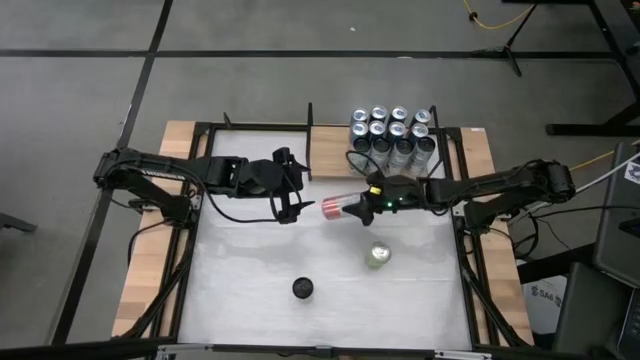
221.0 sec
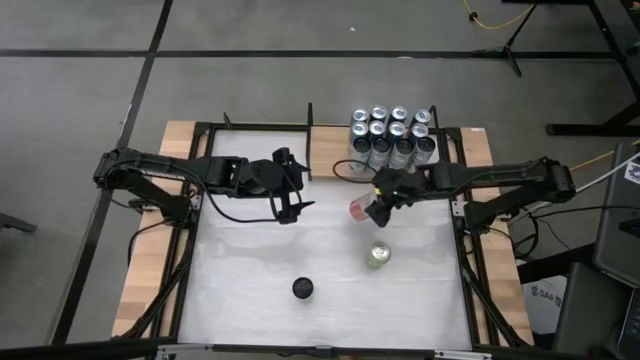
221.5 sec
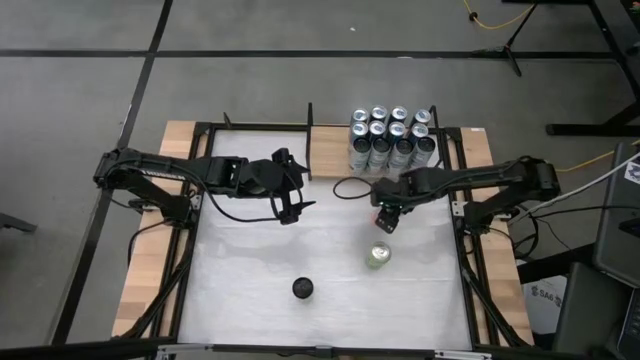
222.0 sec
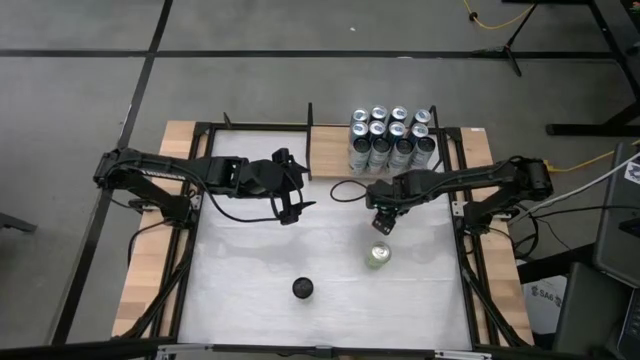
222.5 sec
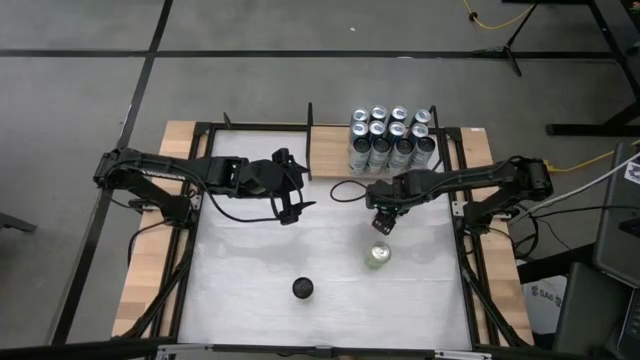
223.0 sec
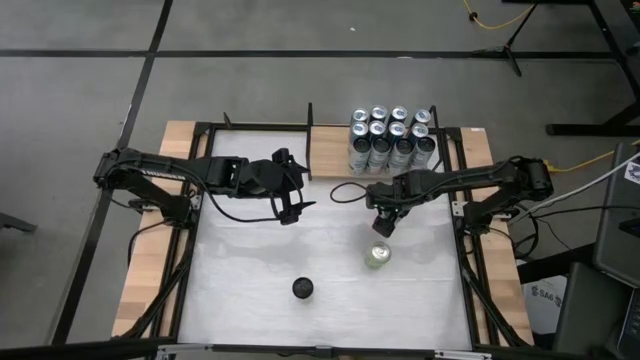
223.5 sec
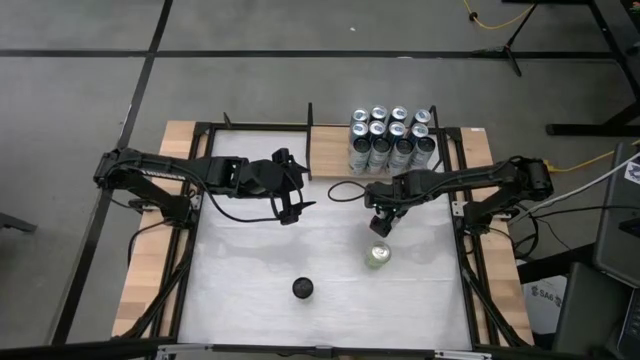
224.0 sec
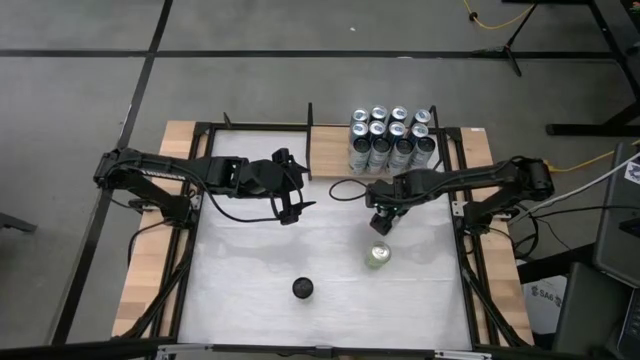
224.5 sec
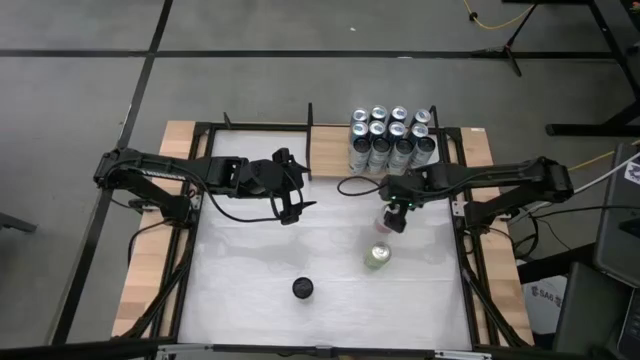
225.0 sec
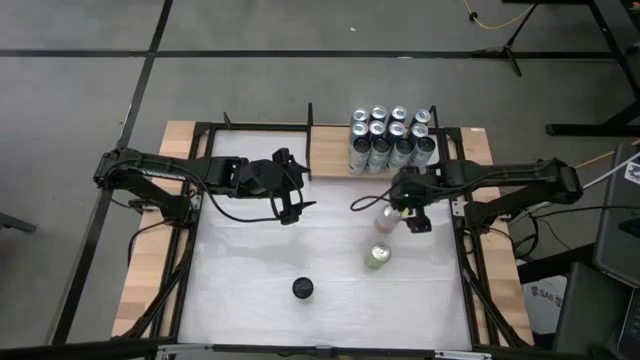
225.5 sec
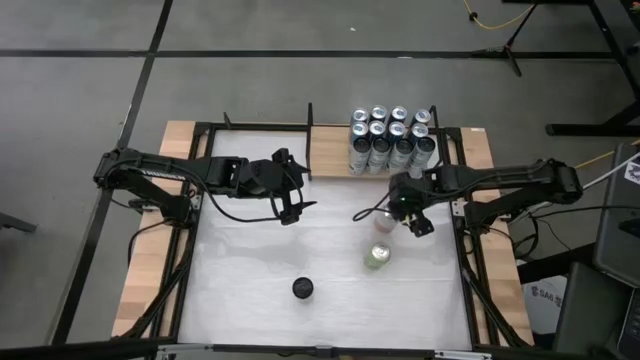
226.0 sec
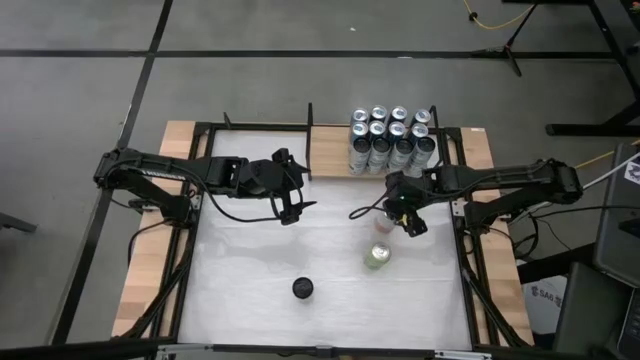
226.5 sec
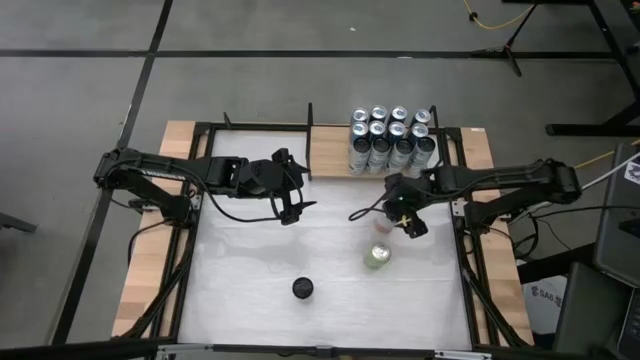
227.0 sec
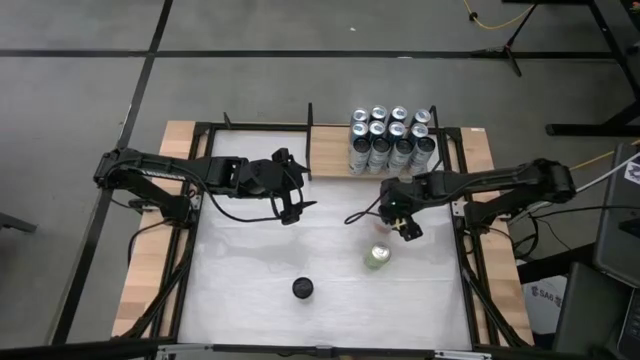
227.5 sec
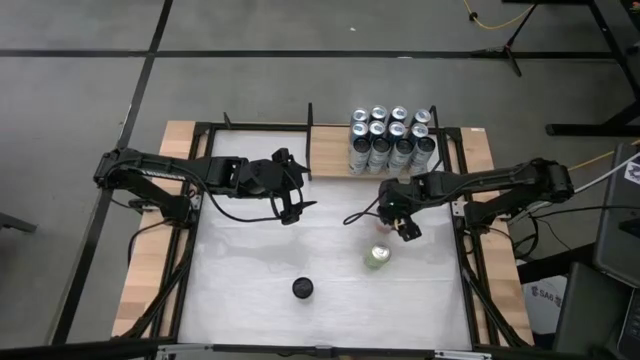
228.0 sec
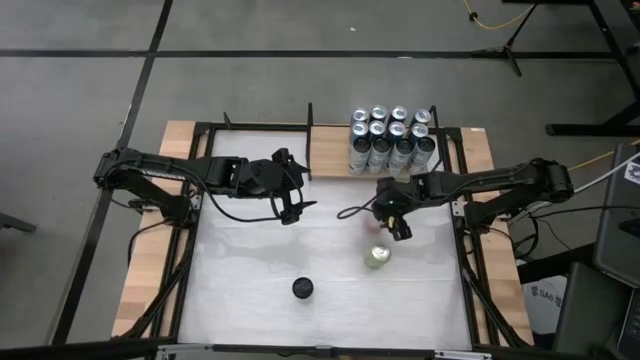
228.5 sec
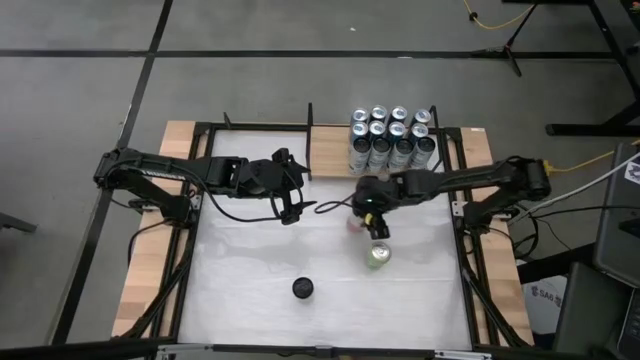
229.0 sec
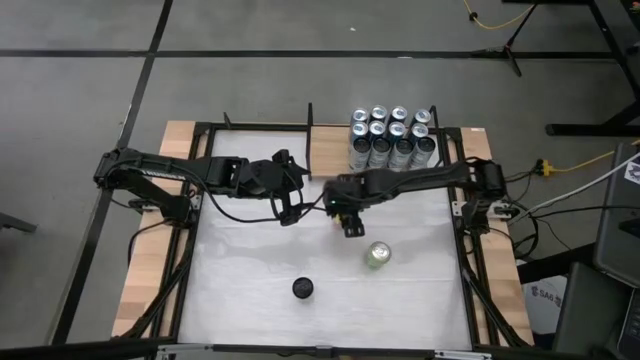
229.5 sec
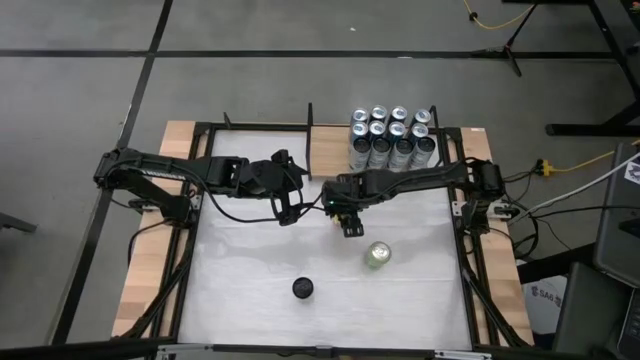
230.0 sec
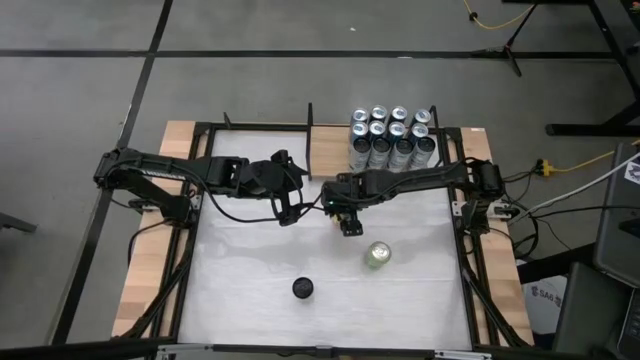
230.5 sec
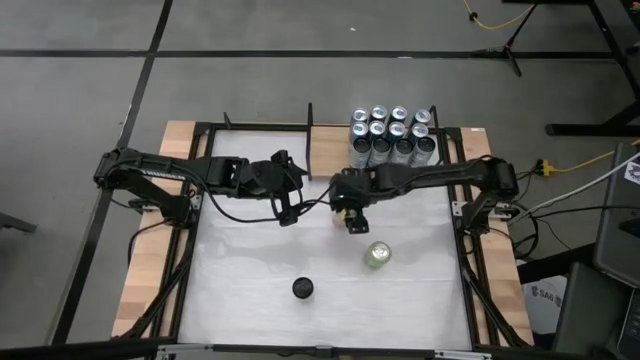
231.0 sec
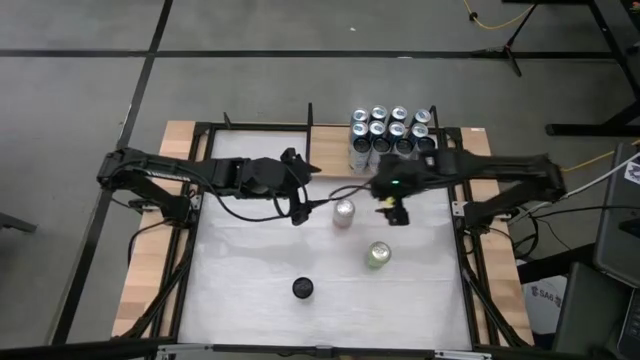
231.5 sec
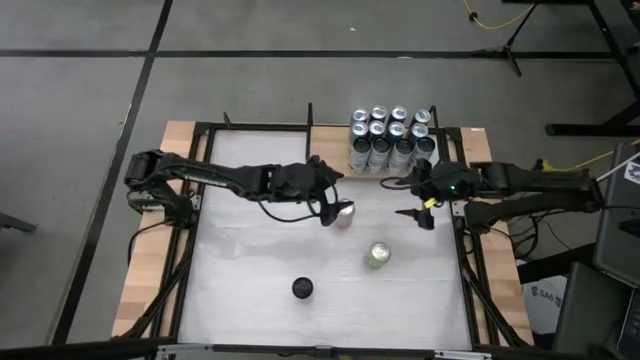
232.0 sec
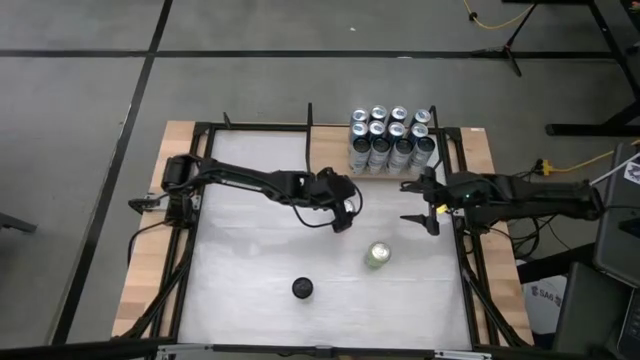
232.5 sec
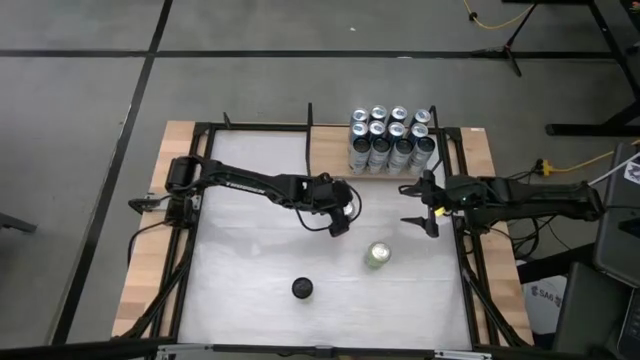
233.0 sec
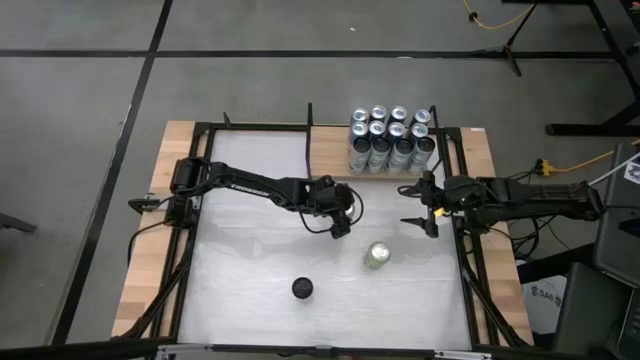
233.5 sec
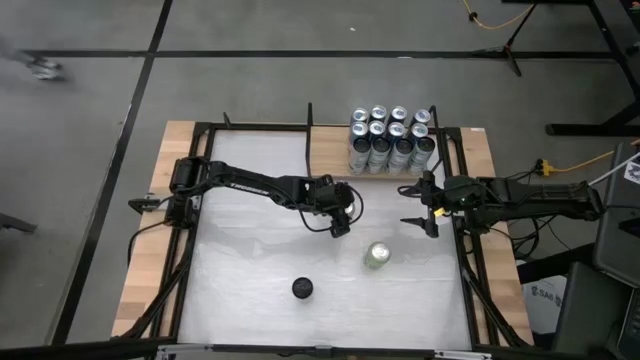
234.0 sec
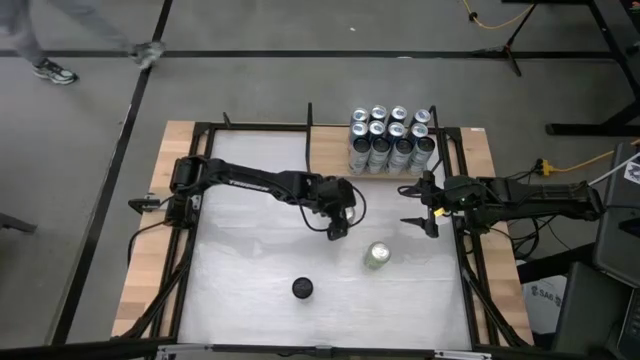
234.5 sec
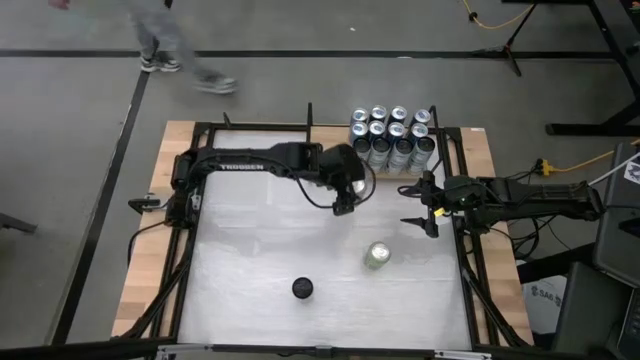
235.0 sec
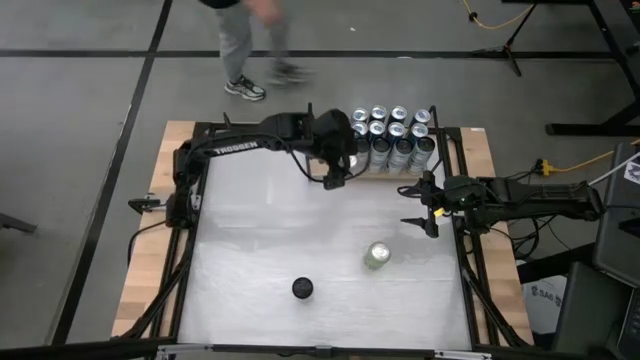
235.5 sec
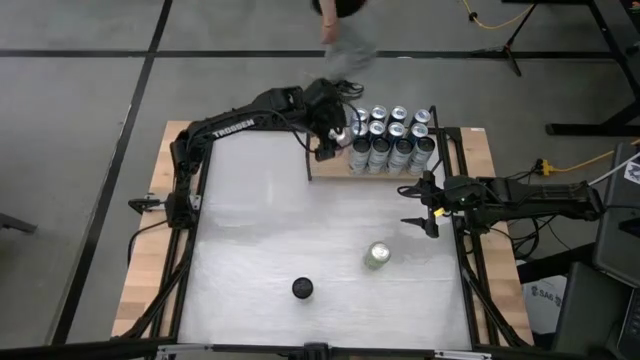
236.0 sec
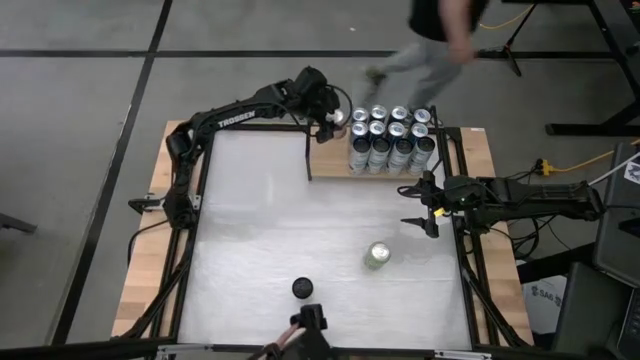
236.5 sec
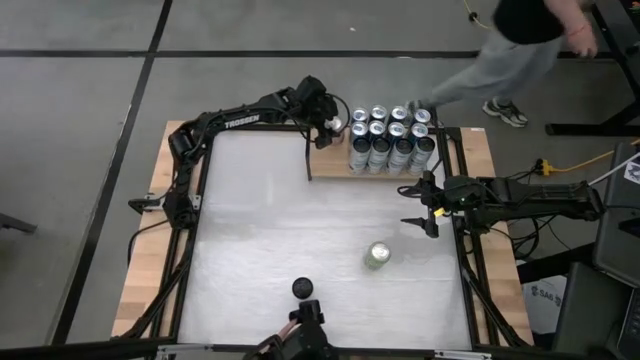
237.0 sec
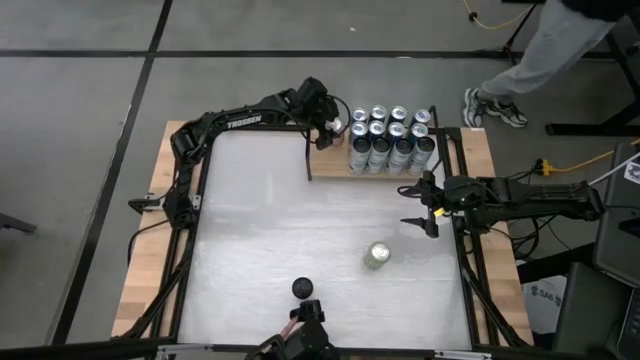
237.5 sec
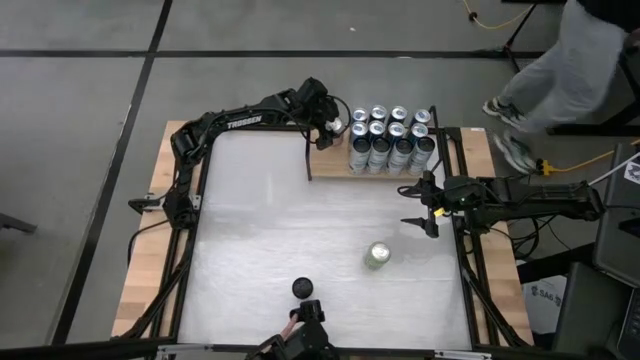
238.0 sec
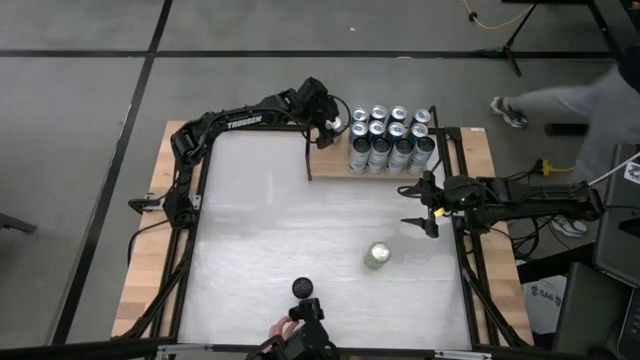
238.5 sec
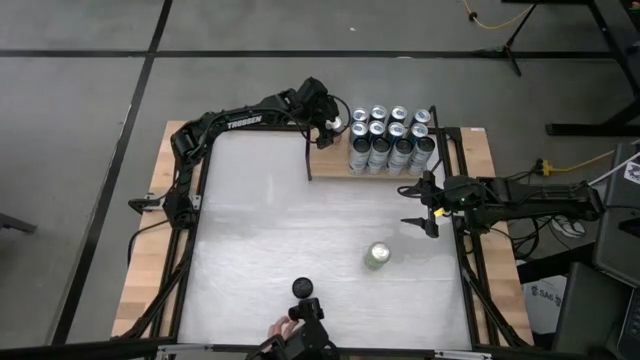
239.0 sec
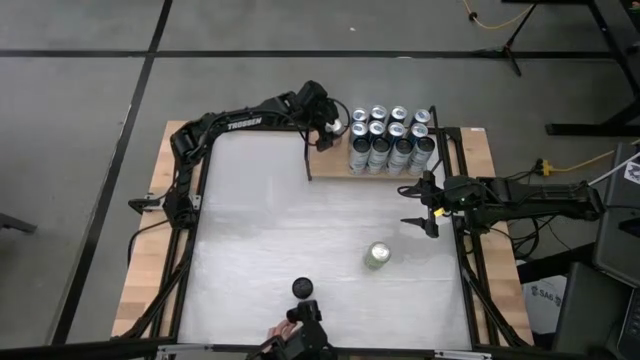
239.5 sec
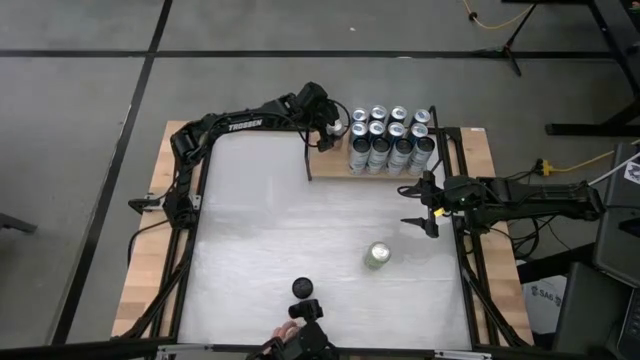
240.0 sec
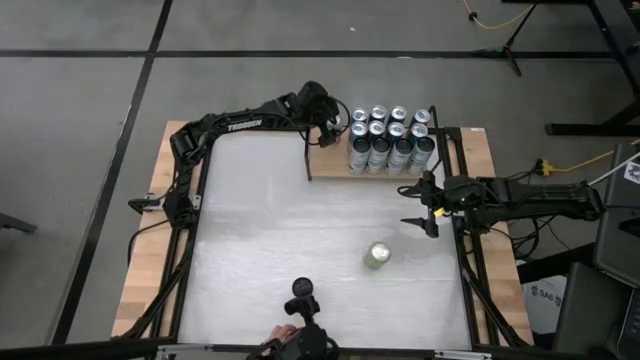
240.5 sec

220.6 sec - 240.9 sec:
Task: Place canned beverage on shelf
Put the orange-white soda can on the shelf

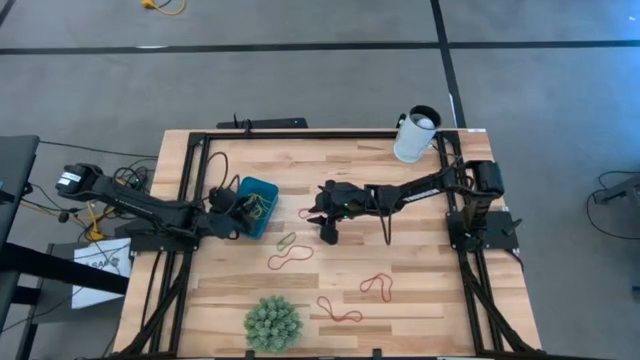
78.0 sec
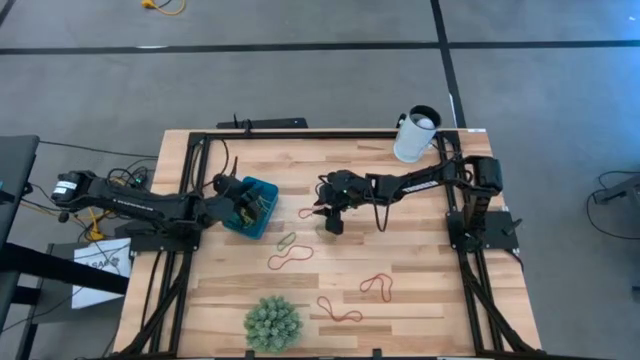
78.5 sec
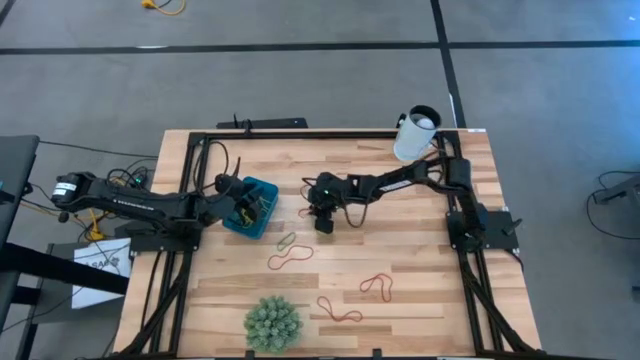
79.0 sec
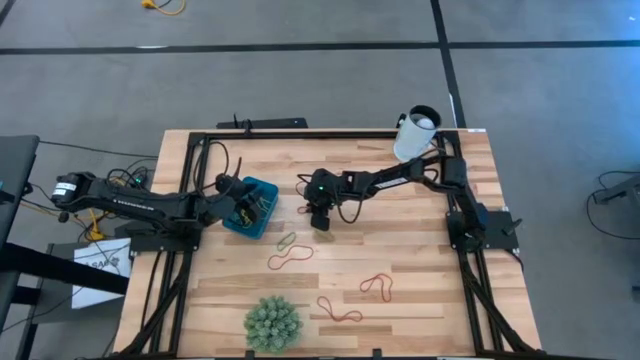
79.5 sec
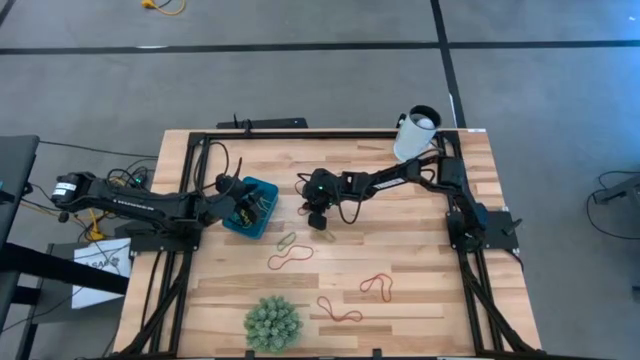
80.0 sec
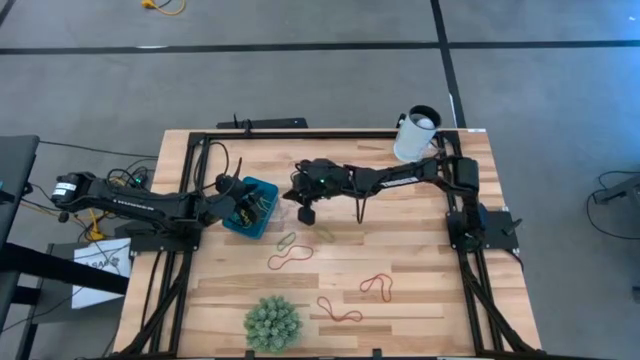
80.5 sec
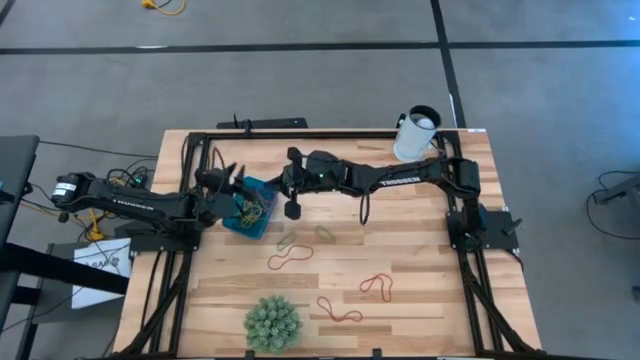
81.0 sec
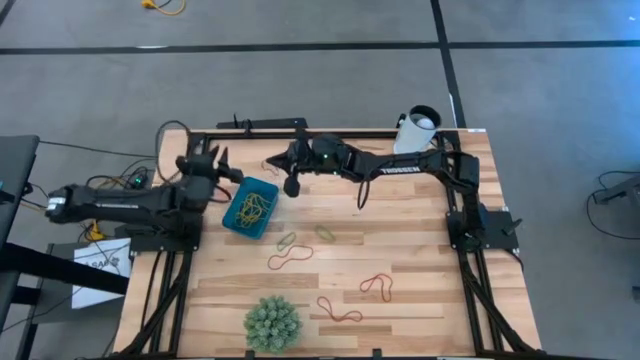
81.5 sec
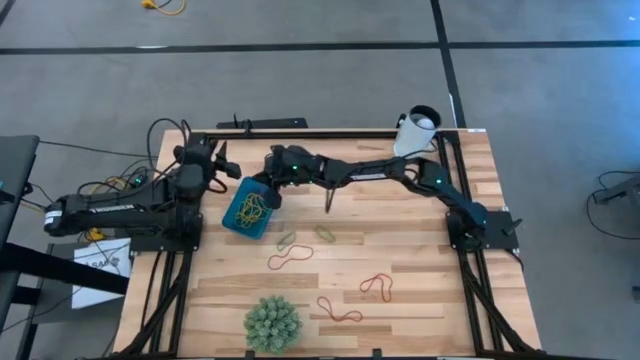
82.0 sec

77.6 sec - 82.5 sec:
Task: Pick and place items into bin
Put the red rubber band into the blue bin
